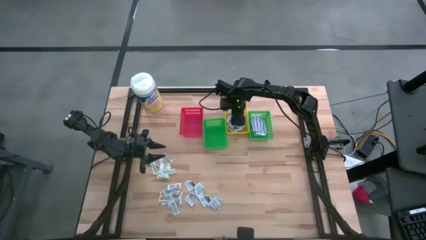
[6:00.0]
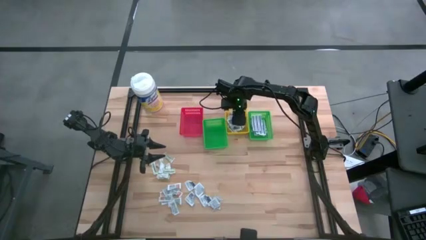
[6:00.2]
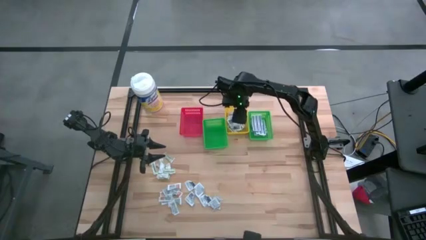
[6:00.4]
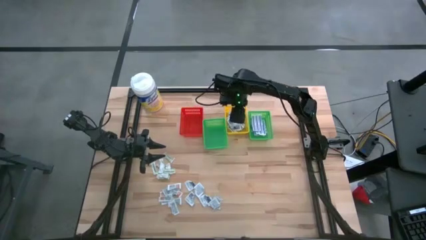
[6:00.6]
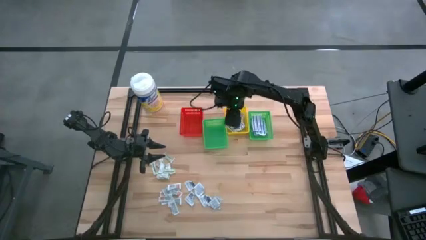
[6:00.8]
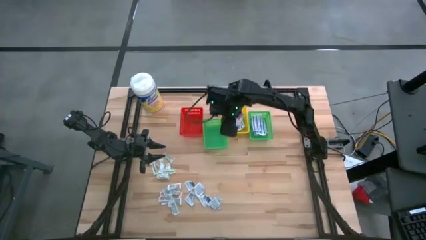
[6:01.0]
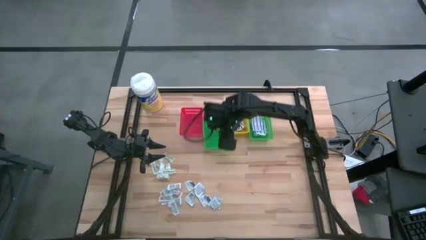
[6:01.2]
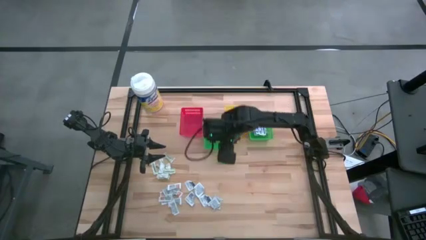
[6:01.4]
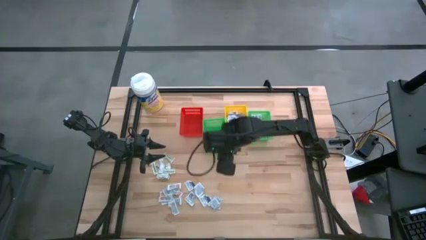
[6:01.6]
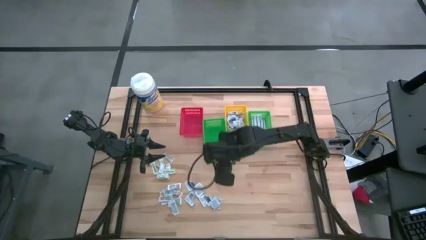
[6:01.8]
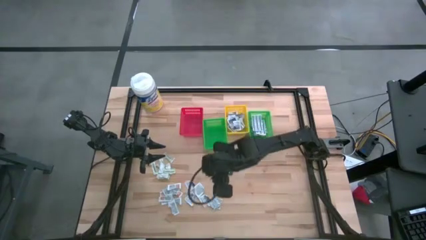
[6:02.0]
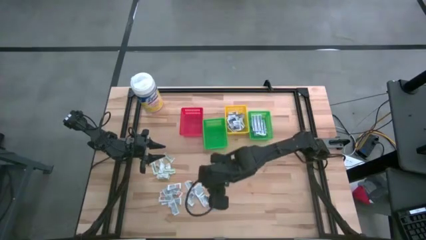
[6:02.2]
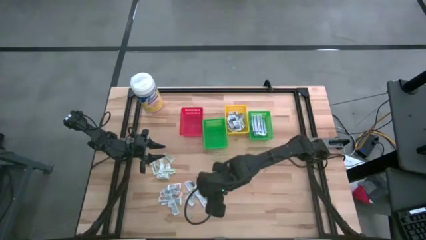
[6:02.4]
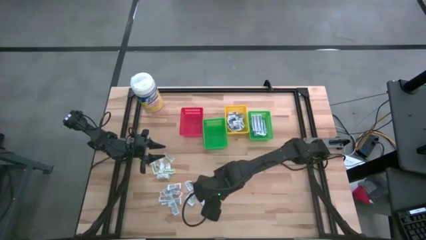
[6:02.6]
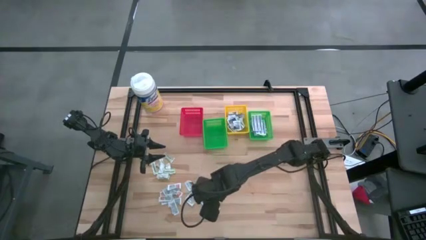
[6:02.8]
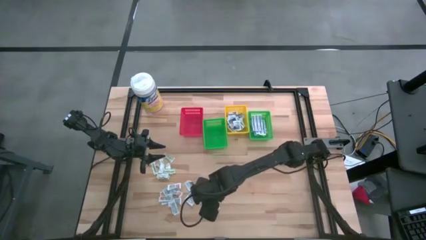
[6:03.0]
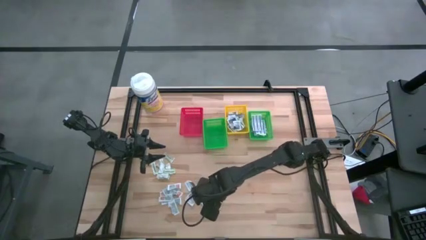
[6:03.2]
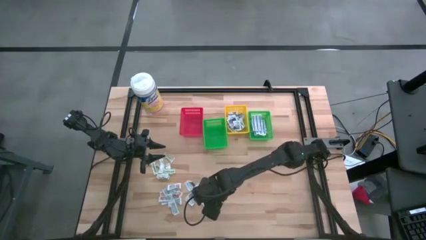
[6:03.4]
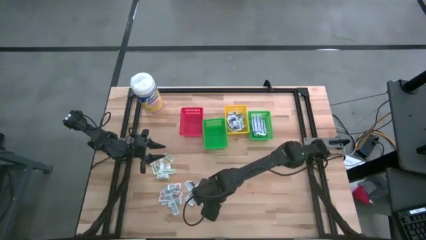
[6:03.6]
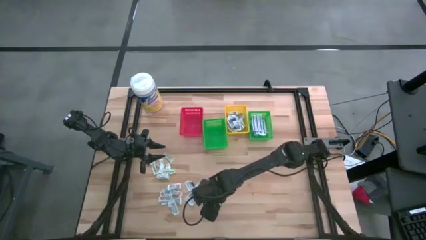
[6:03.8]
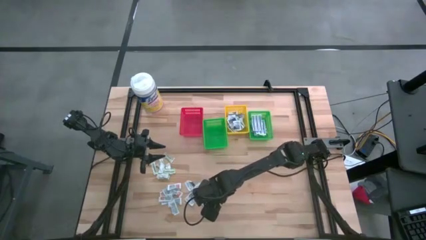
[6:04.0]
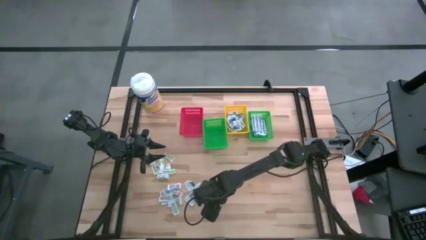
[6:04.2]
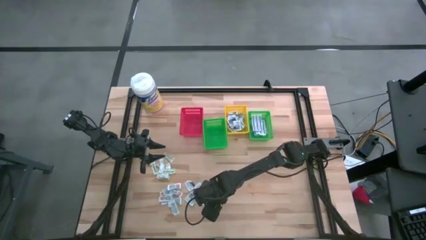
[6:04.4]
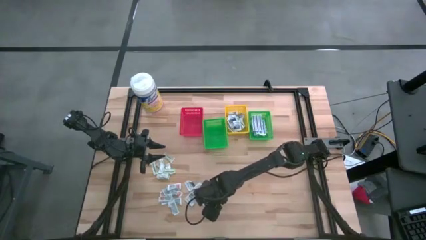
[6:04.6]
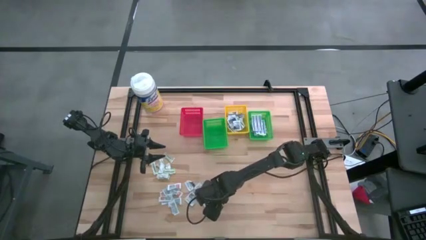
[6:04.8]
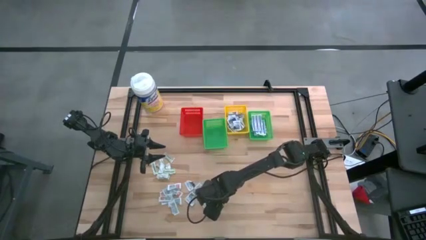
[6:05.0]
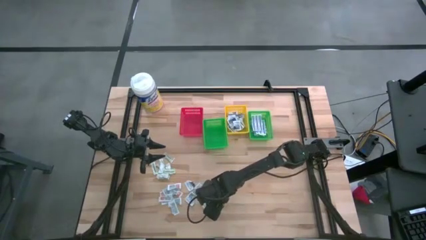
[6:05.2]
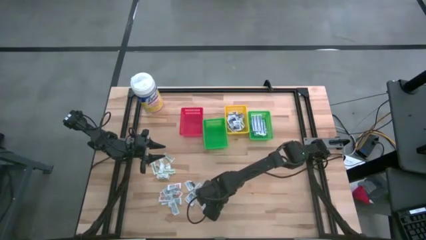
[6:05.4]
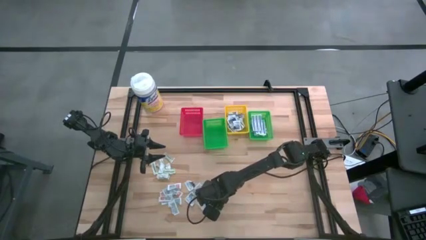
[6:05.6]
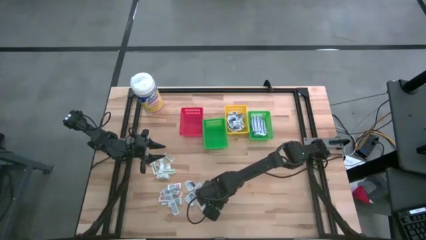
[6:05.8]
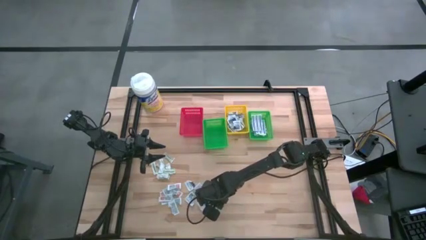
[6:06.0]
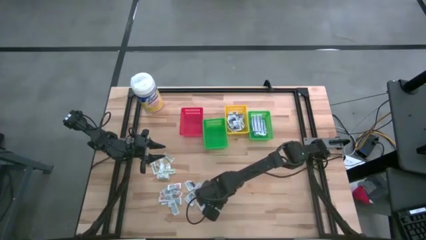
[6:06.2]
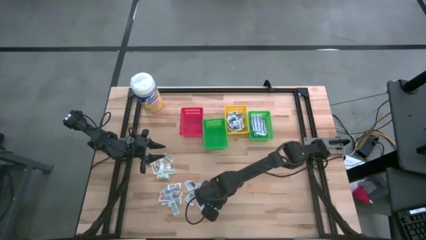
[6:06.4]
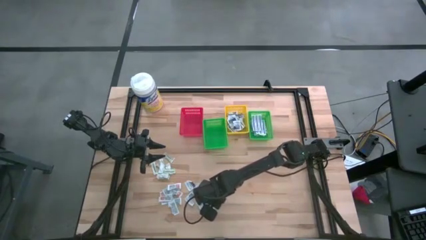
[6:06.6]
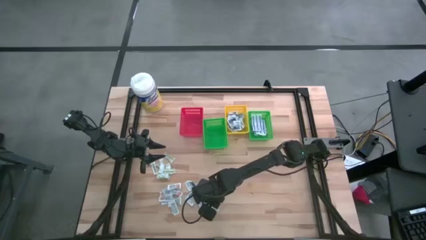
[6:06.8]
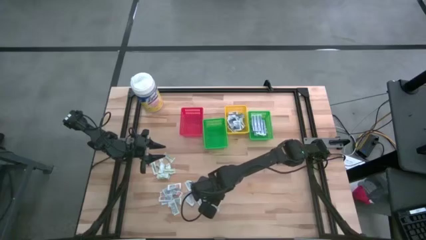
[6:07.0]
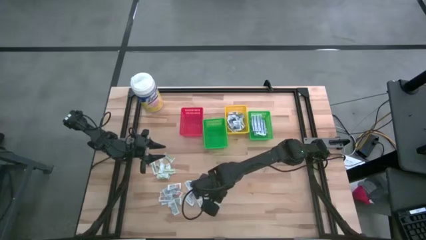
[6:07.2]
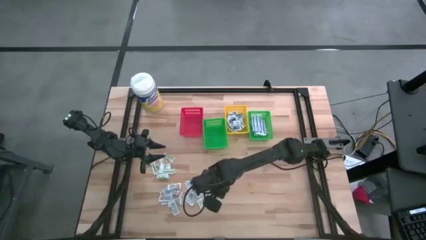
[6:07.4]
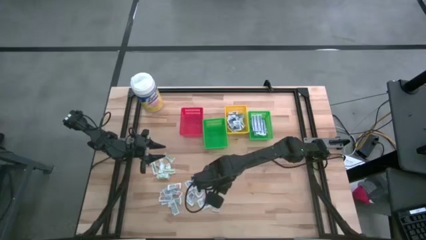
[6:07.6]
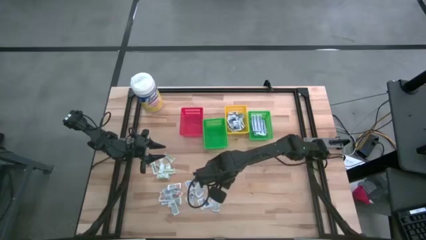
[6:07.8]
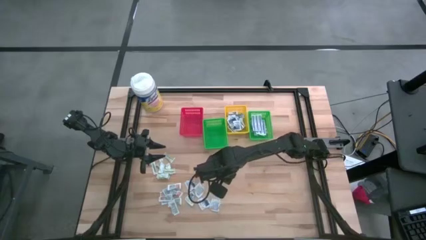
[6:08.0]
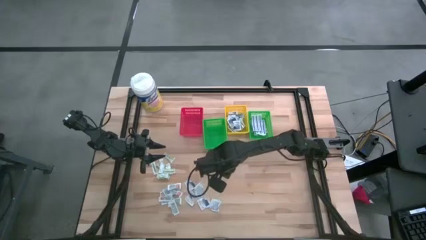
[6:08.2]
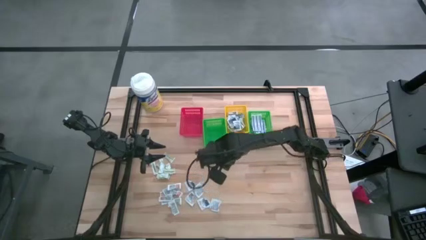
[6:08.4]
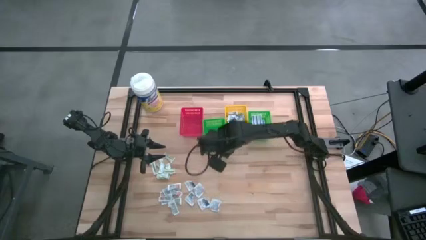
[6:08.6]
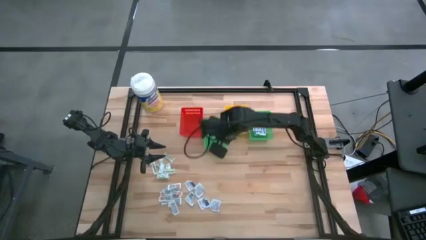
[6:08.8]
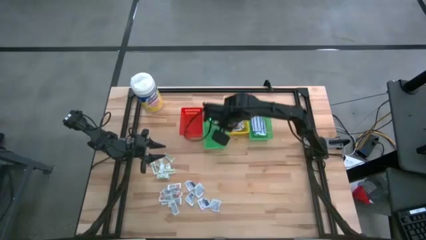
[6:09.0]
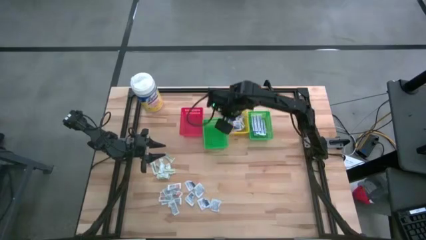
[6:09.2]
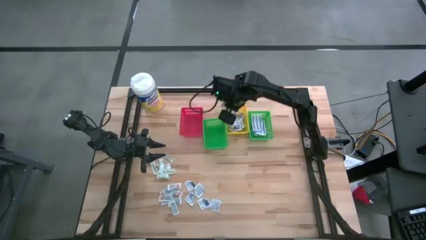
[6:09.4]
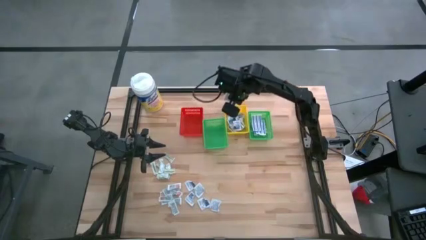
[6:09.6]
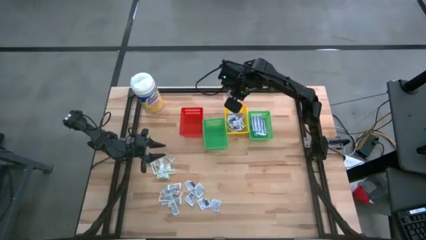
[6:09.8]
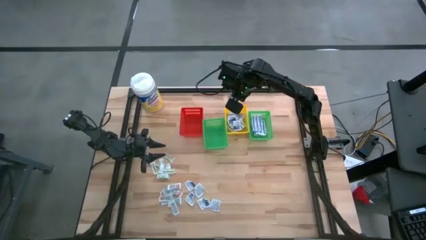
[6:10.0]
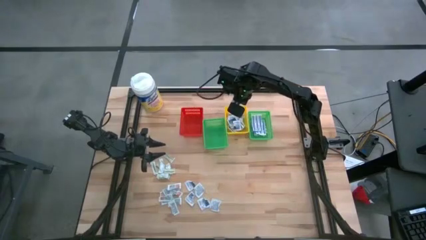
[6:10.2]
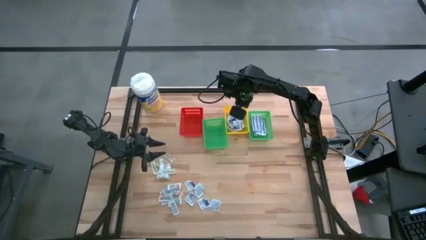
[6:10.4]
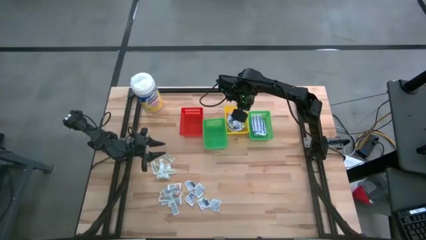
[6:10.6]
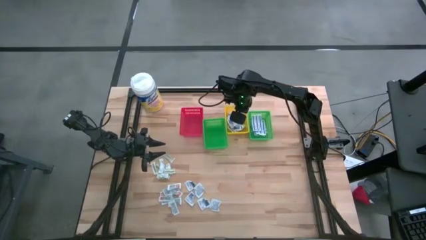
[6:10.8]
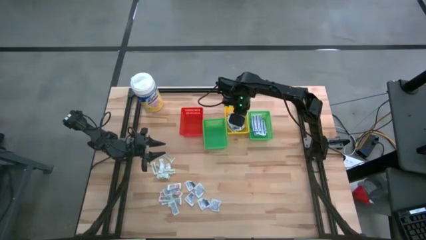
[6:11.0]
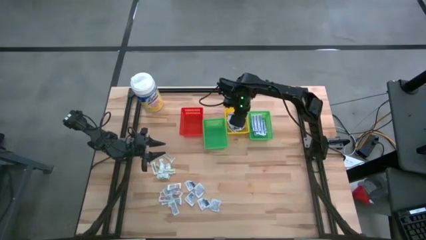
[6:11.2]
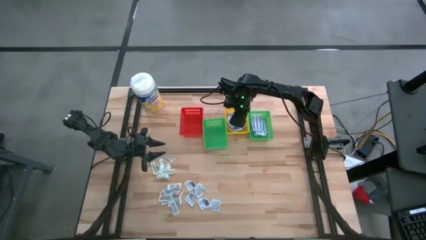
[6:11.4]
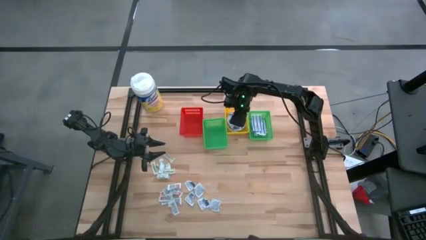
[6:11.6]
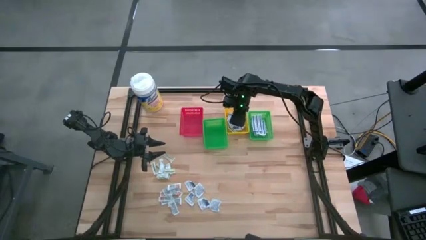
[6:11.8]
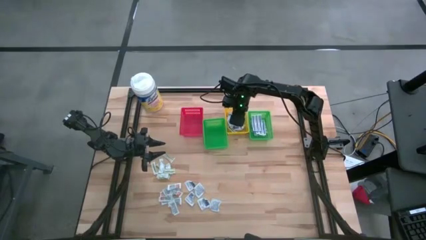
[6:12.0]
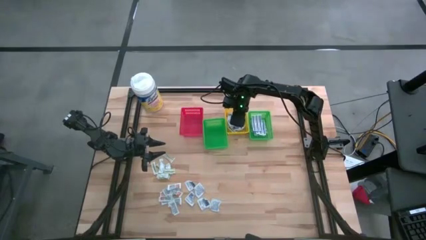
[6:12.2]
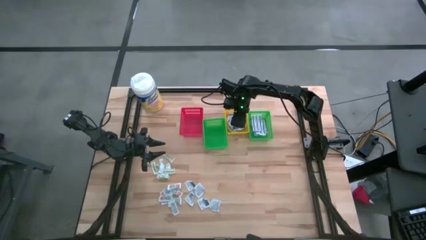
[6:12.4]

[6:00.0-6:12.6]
Task: Pick & Place First Aid Supplies
Put the alcohol pad into the yellow basket

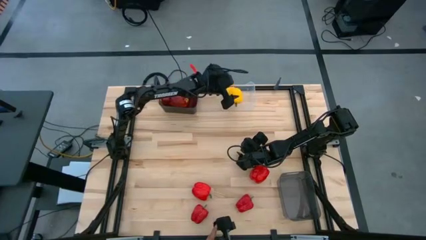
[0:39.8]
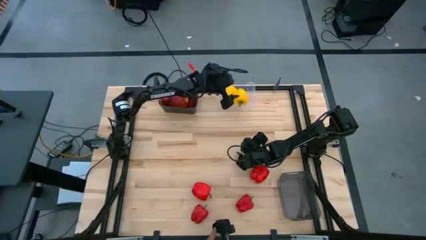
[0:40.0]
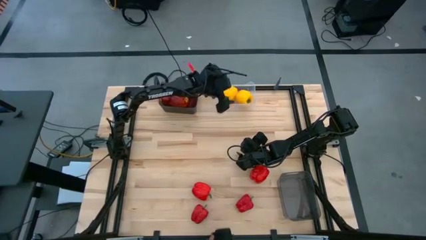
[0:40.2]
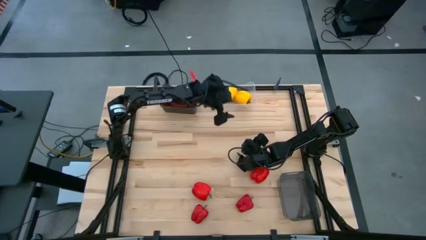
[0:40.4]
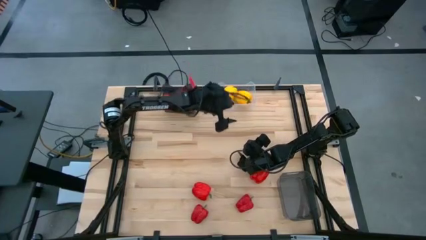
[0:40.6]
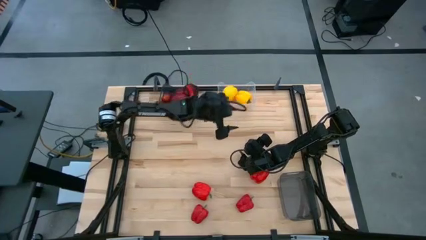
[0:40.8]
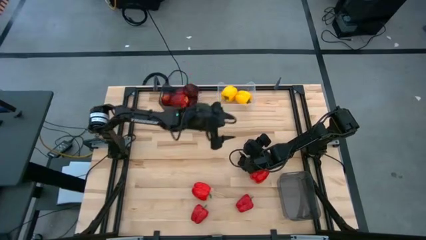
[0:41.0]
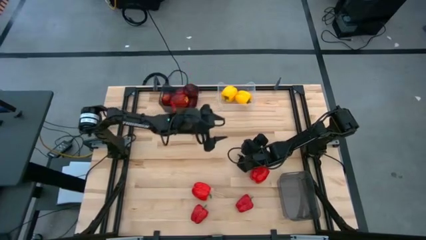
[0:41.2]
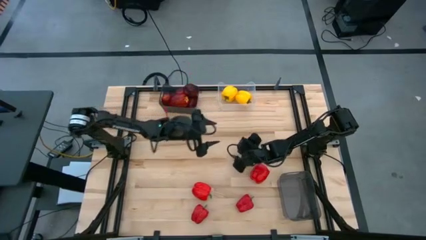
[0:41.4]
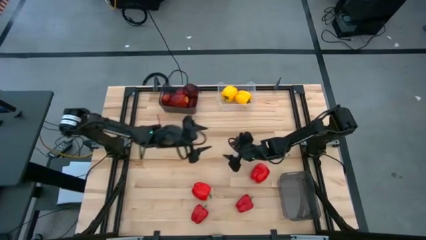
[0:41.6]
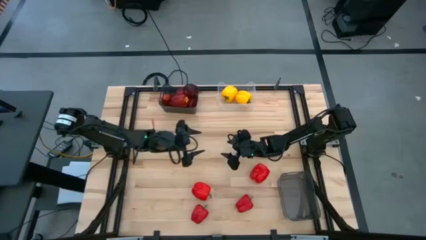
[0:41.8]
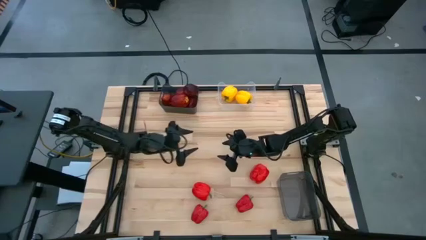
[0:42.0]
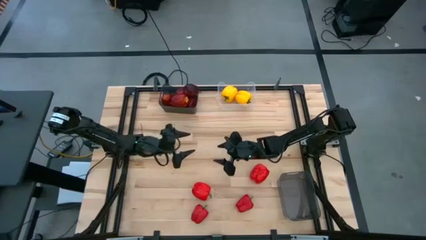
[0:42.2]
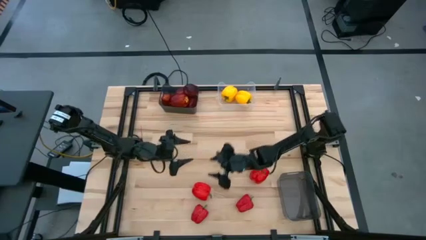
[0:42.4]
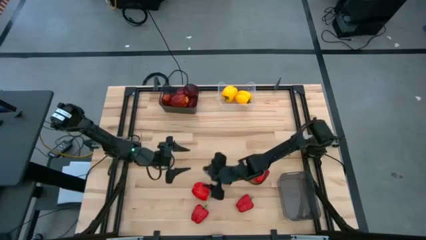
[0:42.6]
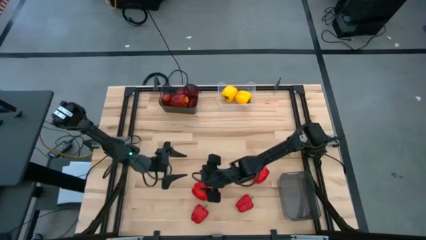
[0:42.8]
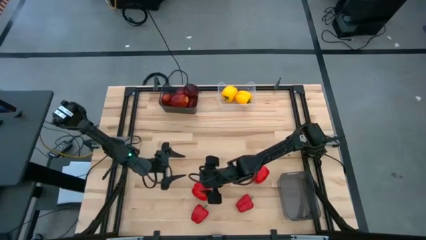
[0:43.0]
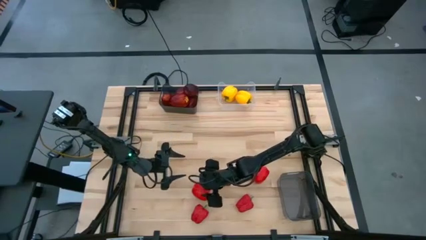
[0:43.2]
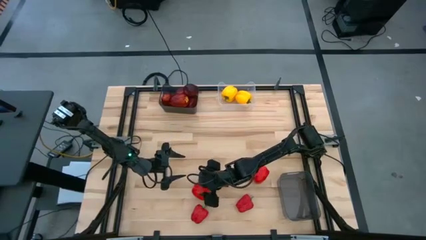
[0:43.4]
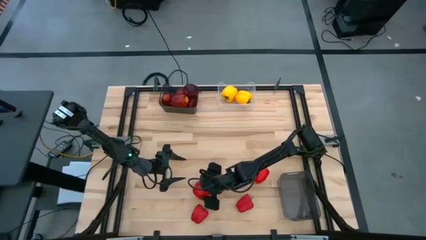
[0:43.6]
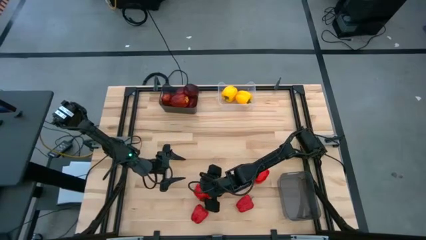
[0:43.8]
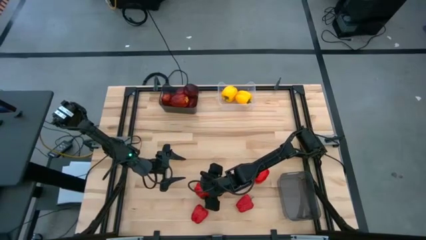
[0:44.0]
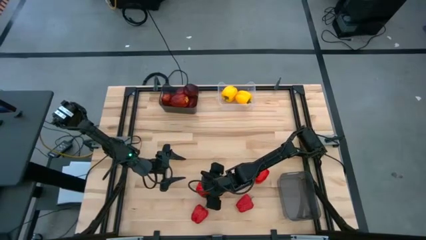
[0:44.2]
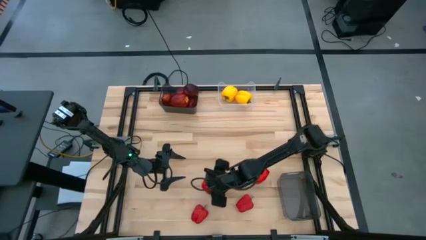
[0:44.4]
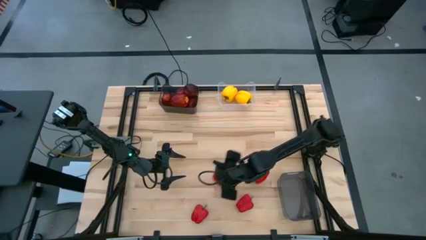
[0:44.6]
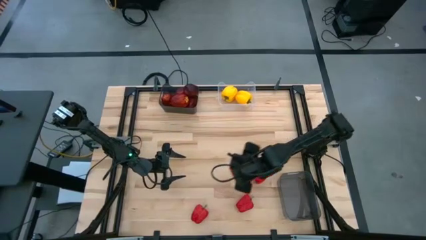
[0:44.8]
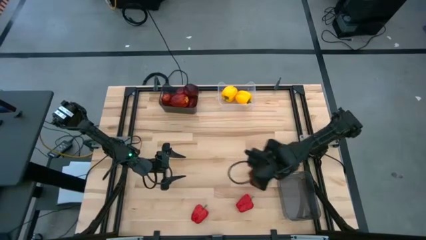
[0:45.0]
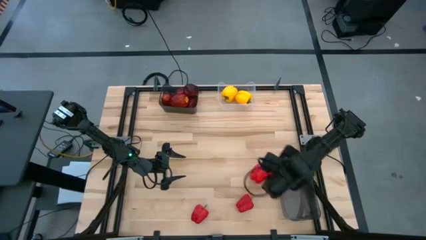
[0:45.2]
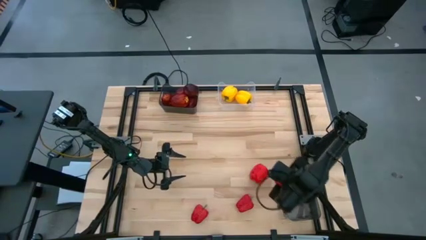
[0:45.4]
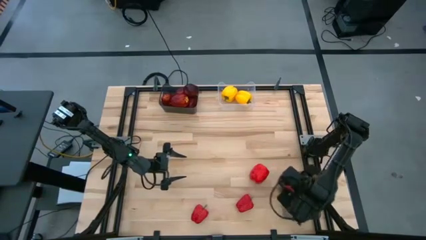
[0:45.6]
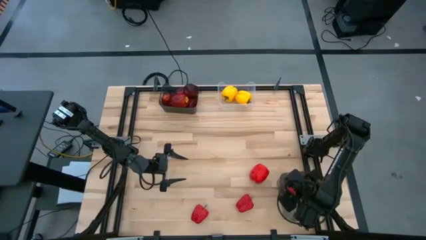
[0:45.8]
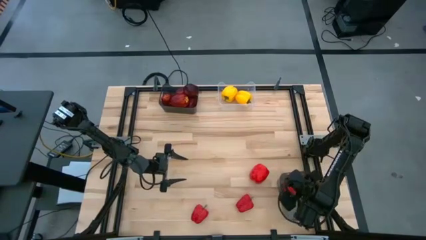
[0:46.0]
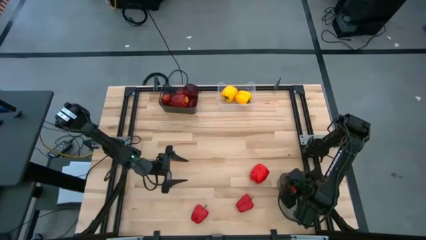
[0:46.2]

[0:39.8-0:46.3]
Task: Sort produce into baskets
Put the red bell pepper into the bottom black bin
